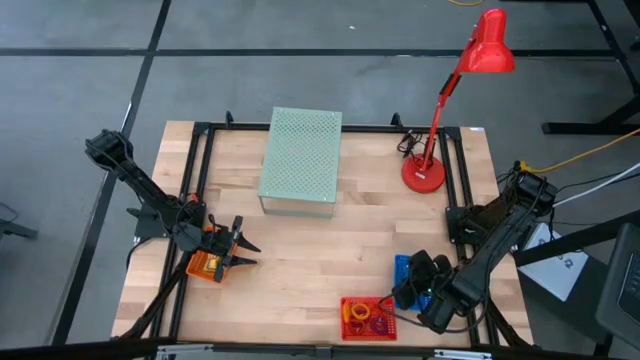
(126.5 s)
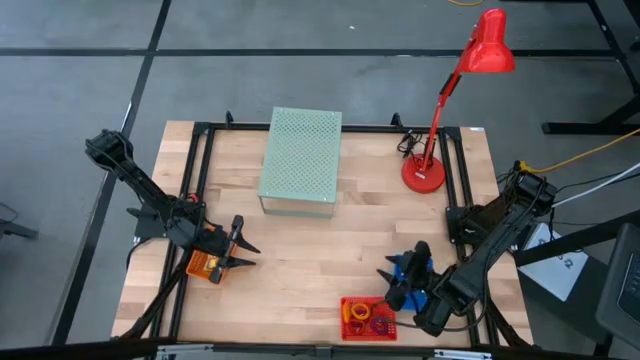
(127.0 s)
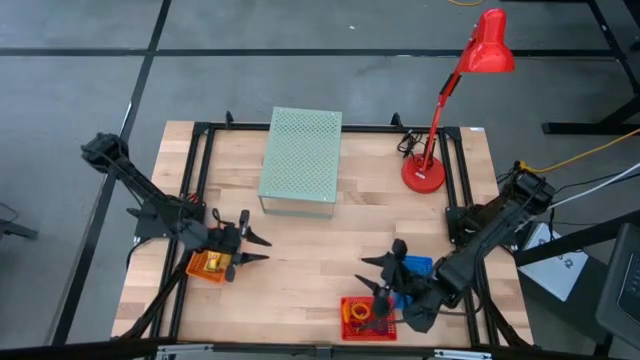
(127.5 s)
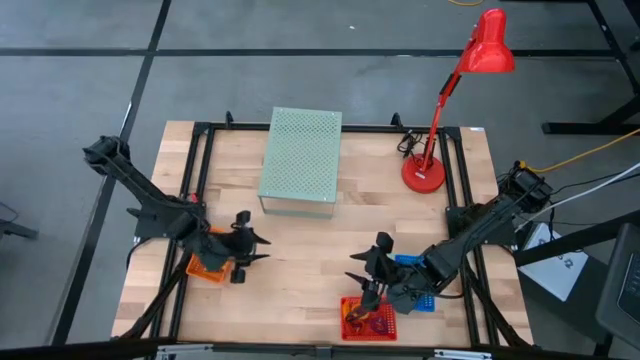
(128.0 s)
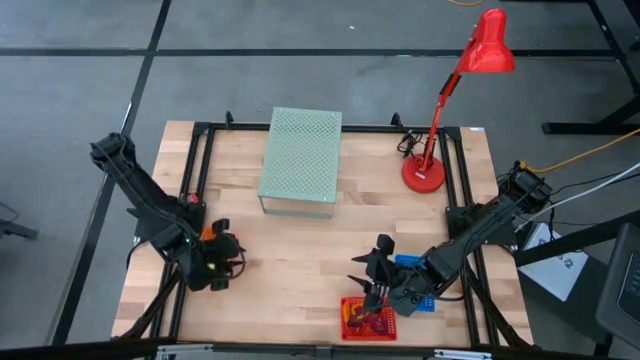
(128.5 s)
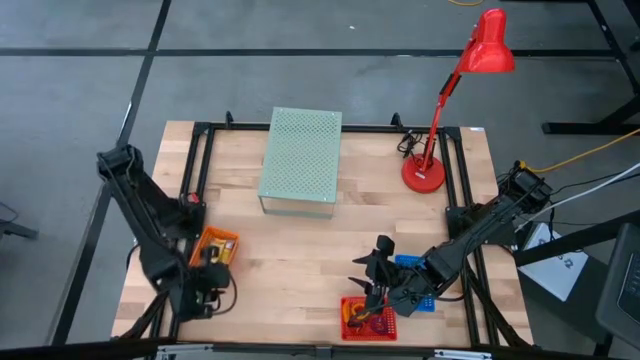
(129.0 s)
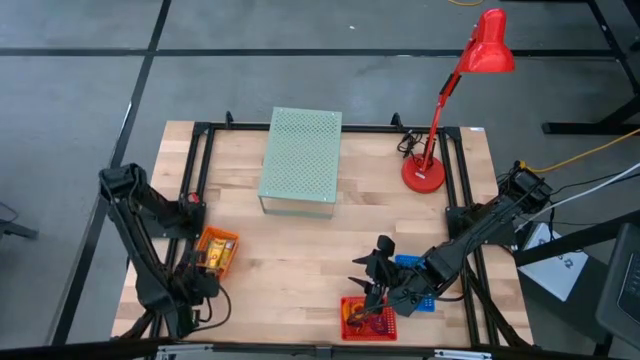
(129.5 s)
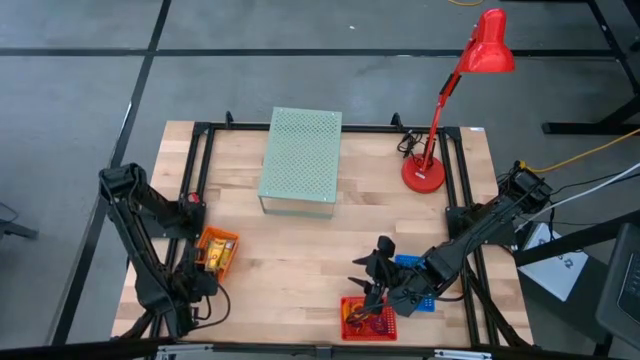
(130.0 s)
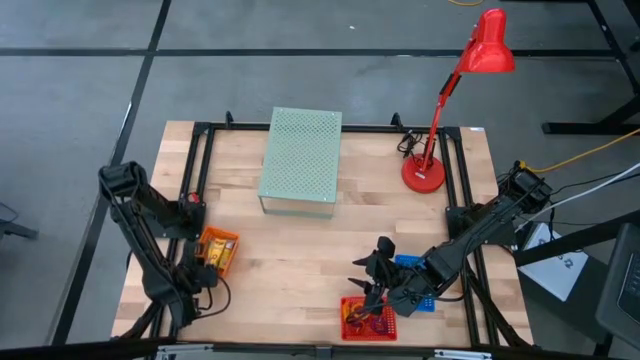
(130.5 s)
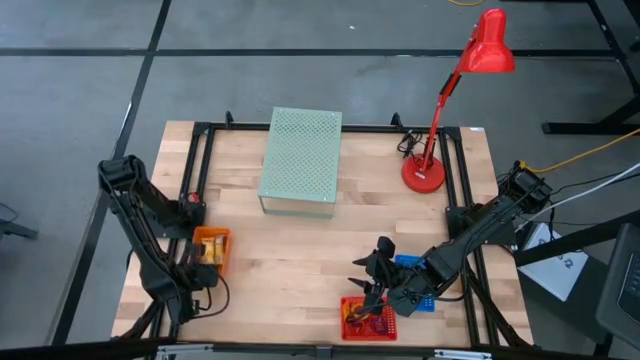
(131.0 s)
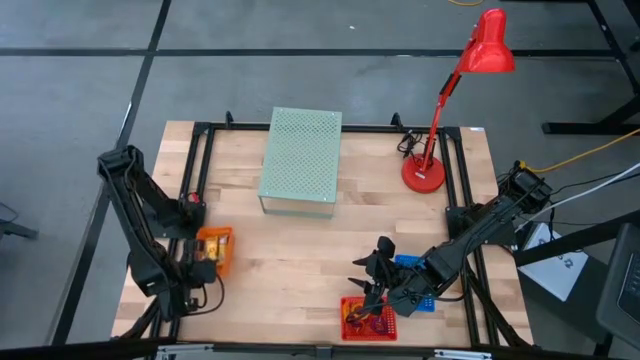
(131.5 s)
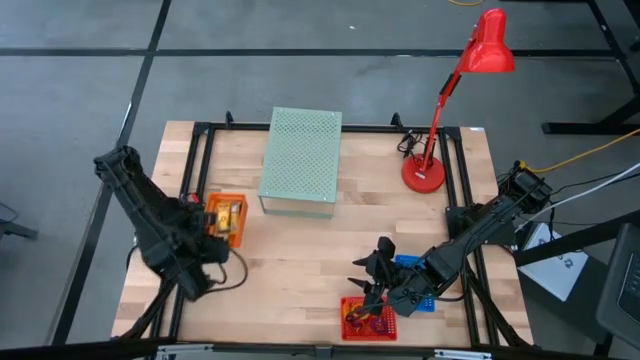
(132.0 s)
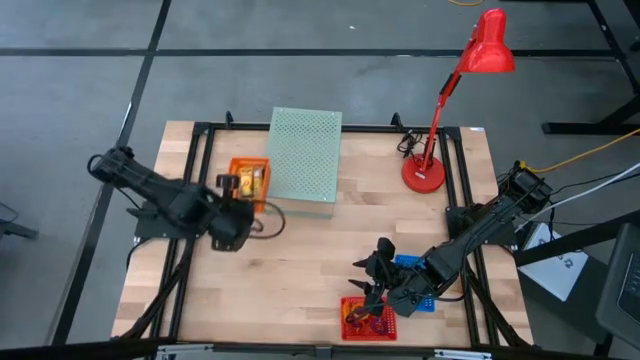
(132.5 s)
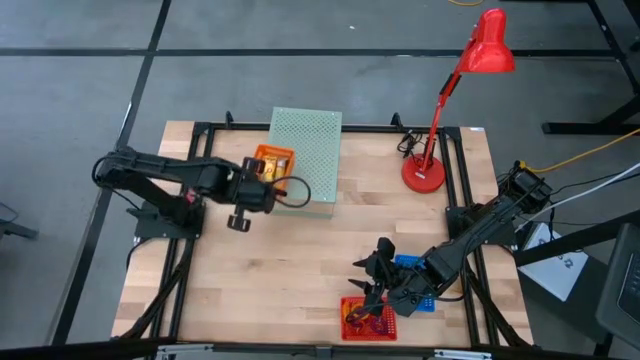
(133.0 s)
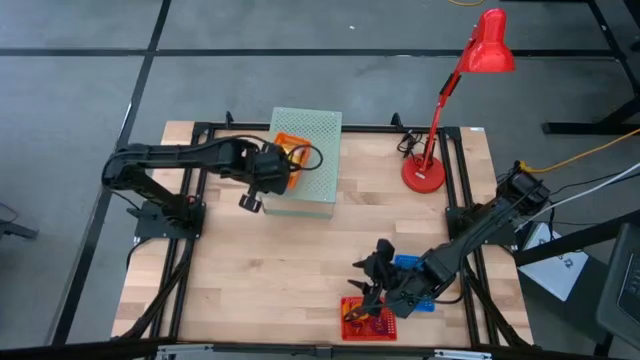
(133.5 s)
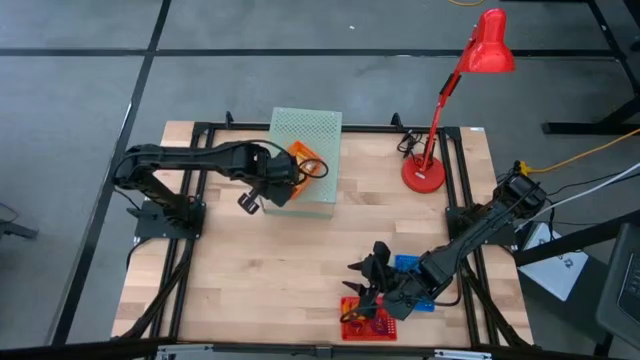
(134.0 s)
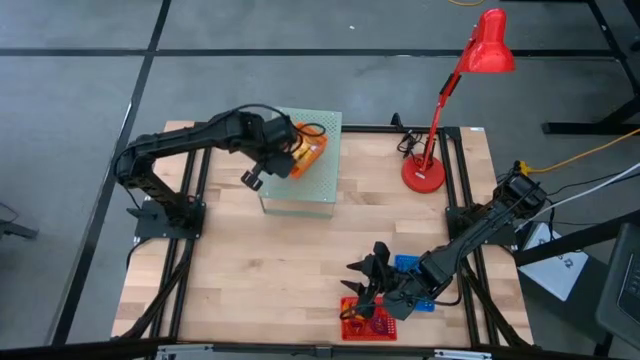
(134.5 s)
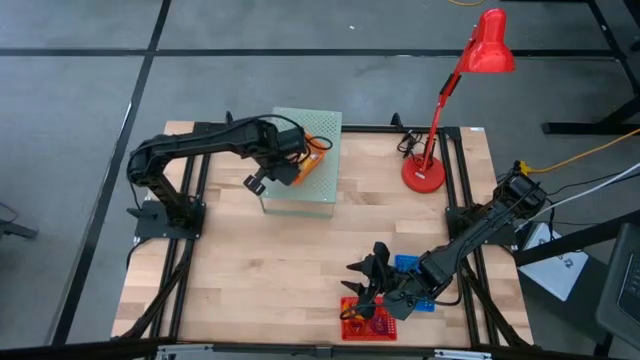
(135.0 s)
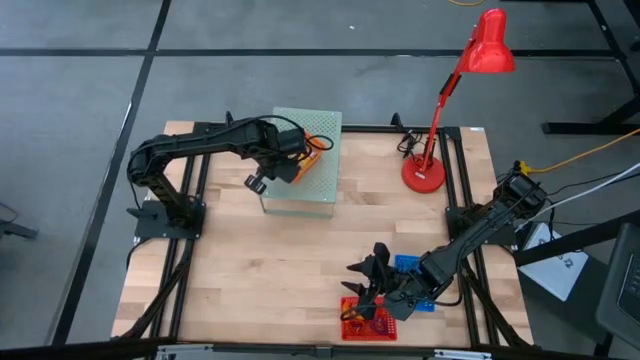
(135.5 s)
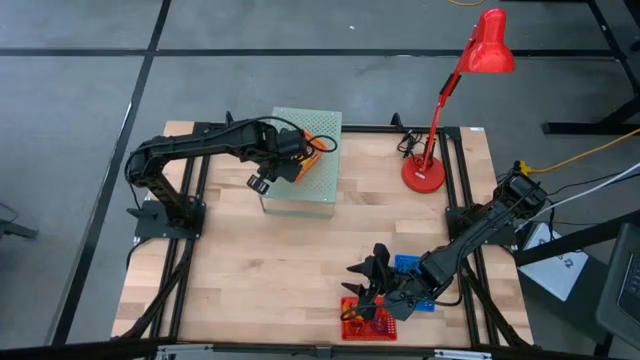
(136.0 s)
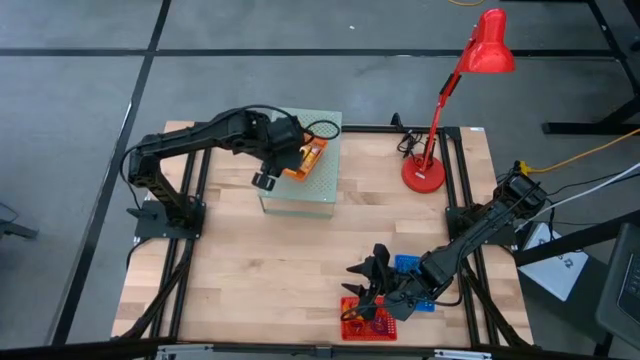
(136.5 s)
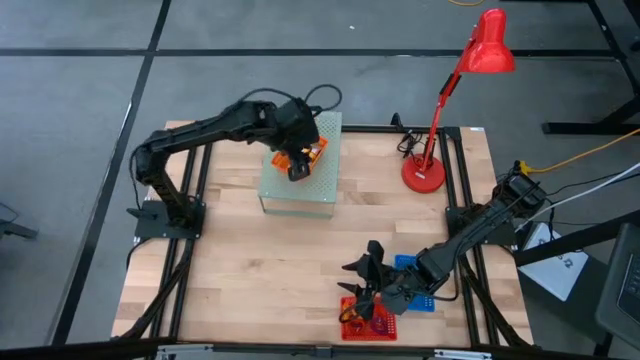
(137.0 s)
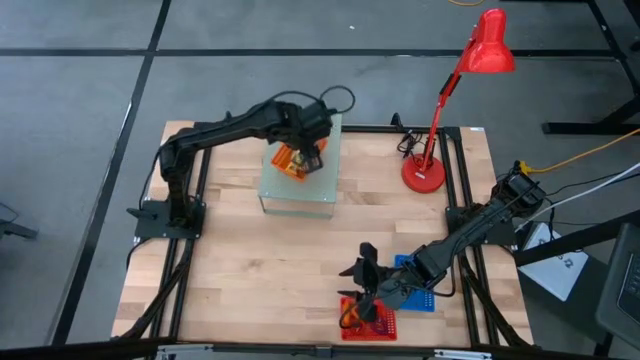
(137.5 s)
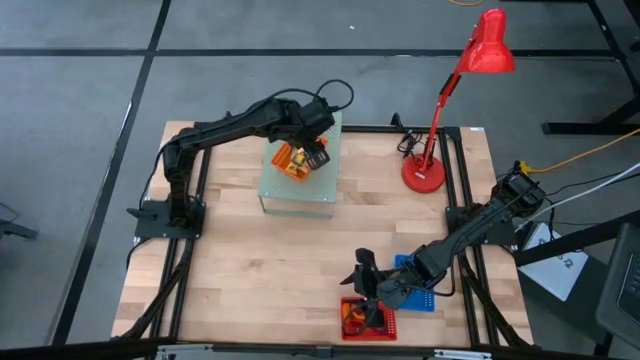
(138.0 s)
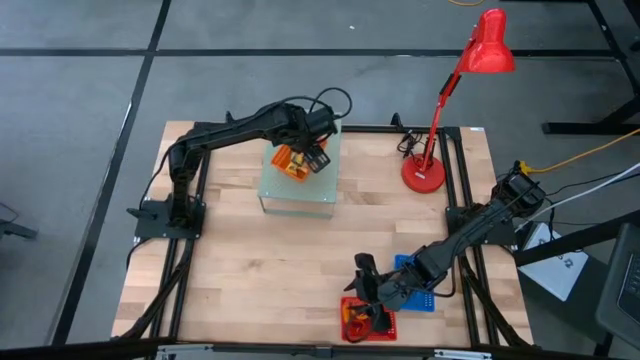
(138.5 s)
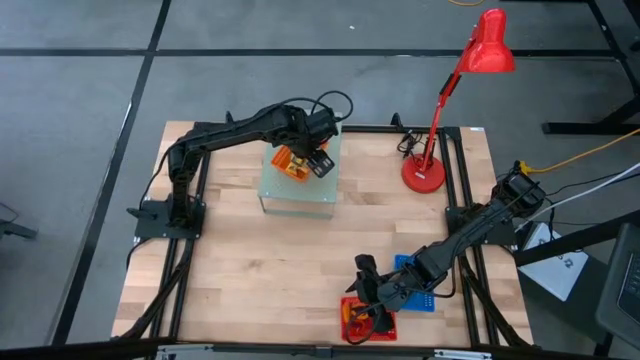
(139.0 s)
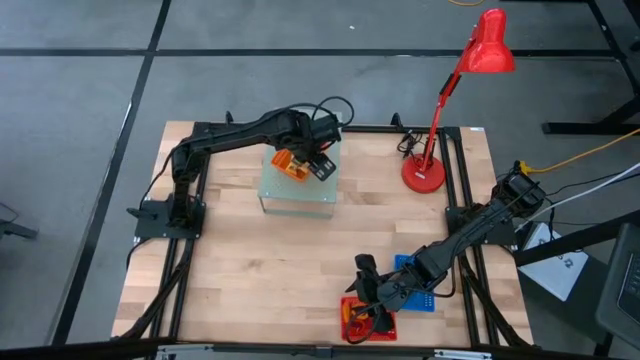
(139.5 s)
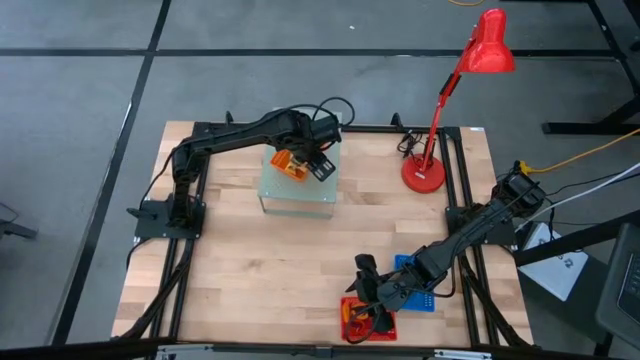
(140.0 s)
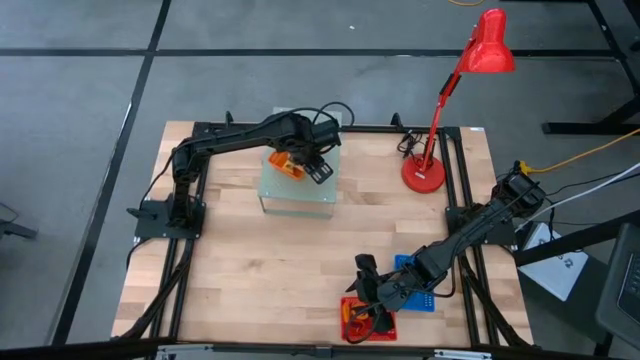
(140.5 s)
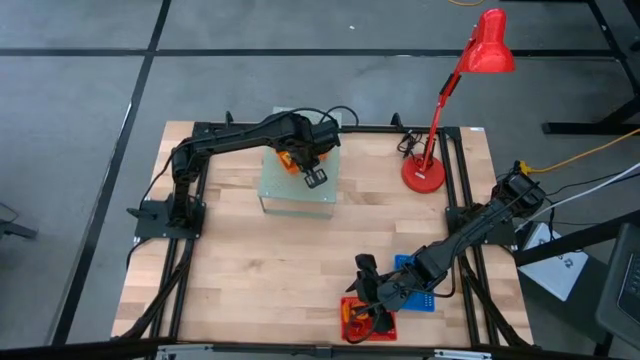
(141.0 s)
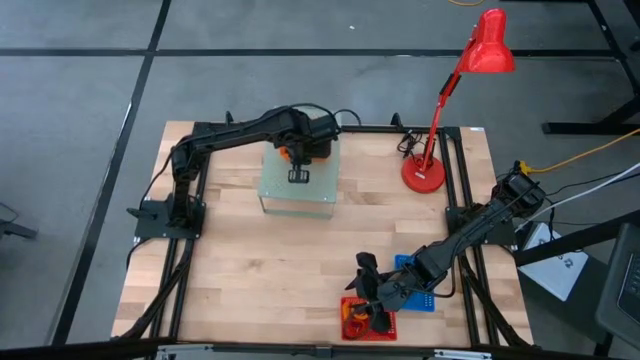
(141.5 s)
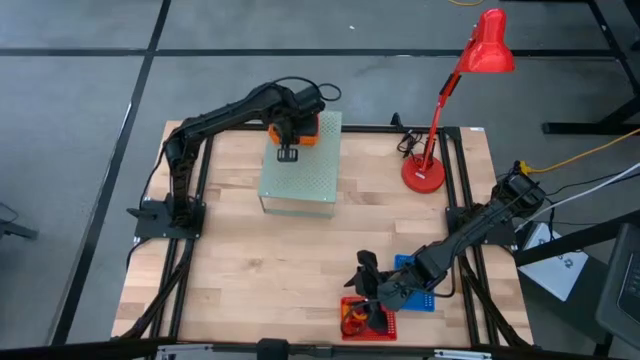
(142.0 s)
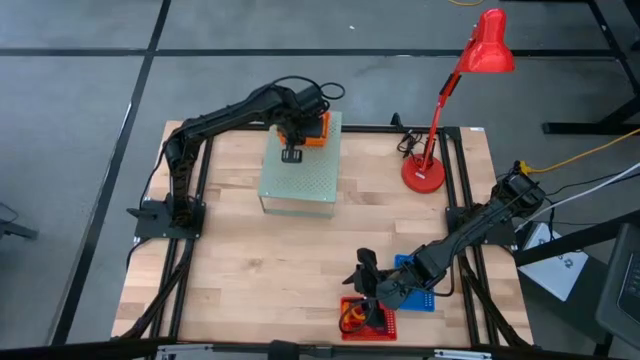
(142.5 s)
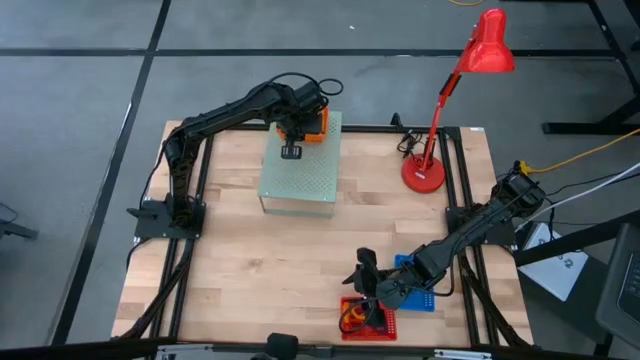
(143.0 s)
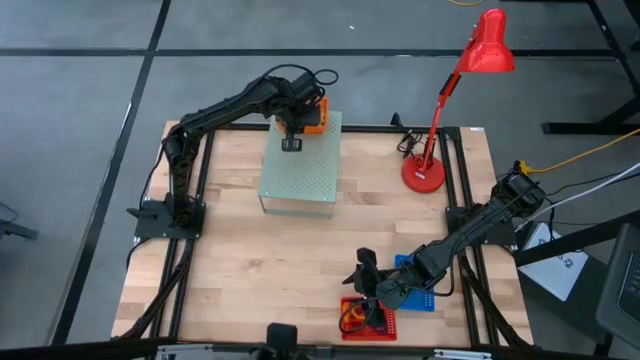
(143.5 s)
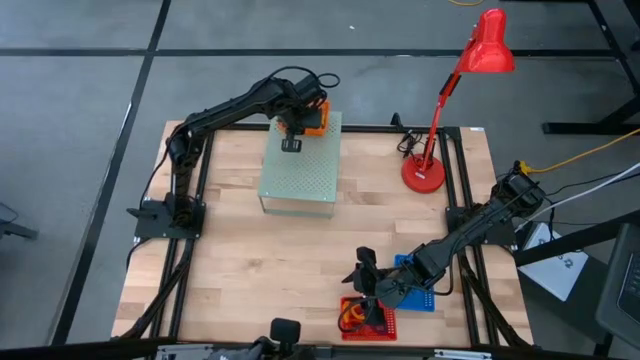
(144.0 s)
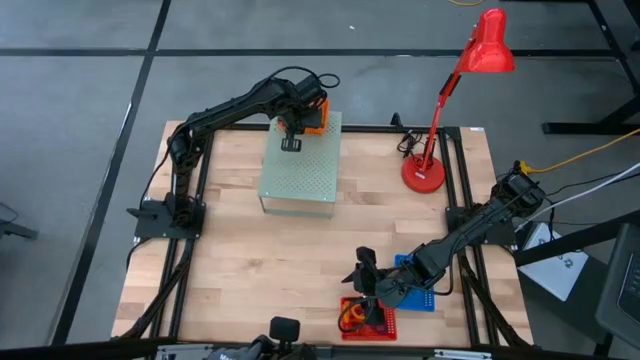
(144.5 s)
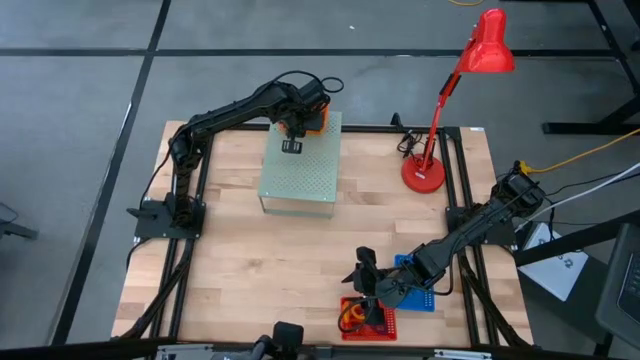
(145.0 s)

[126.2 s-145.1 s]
Task: Pick & Place Office Desk Supplies
Put the orange bin on the shelf

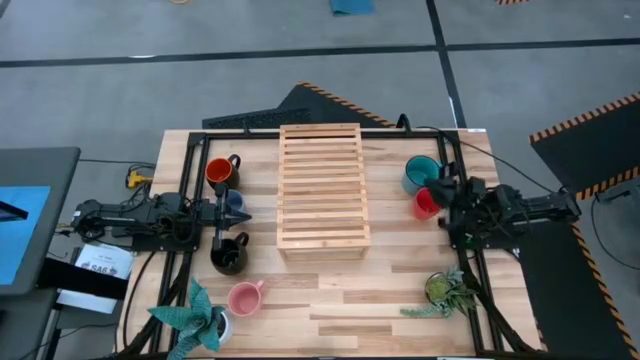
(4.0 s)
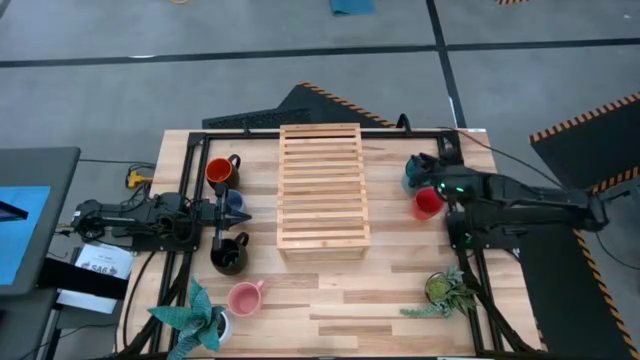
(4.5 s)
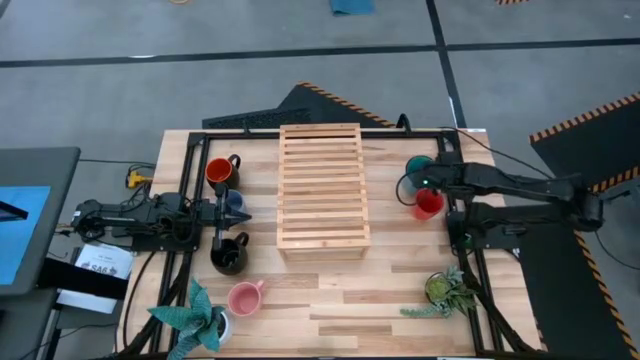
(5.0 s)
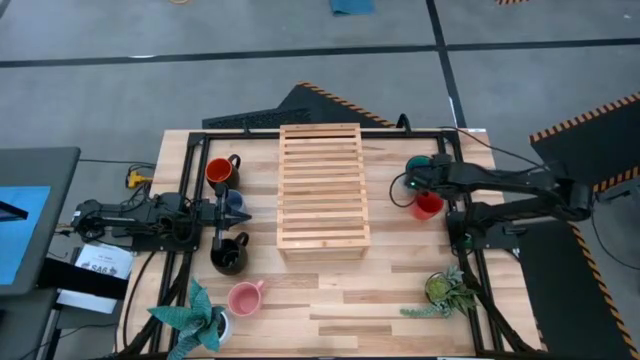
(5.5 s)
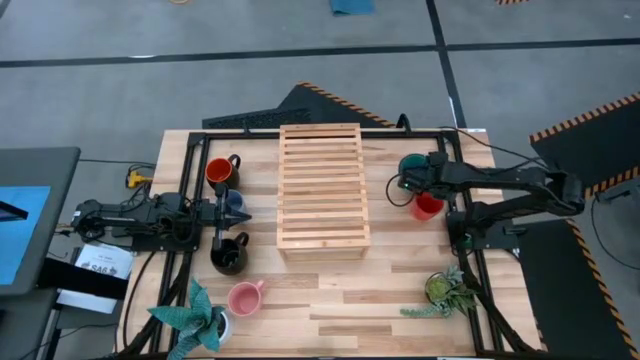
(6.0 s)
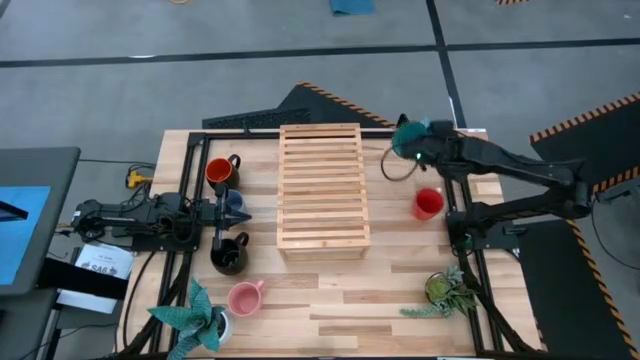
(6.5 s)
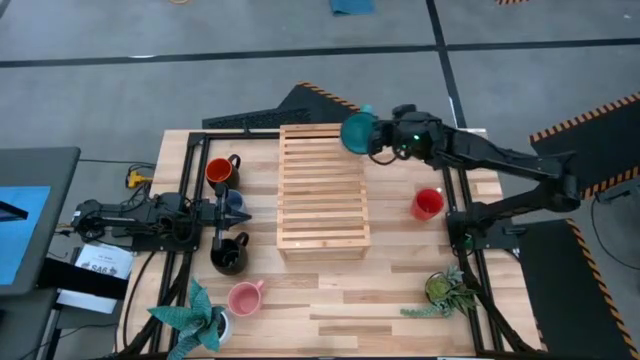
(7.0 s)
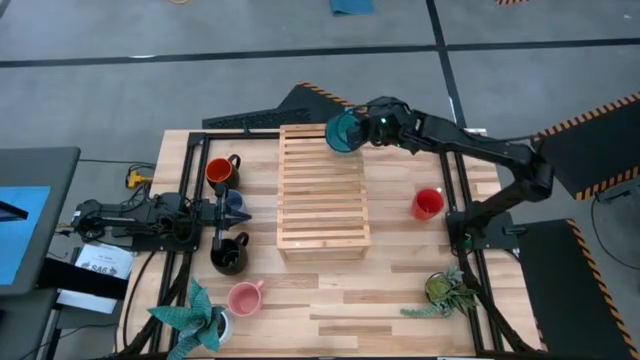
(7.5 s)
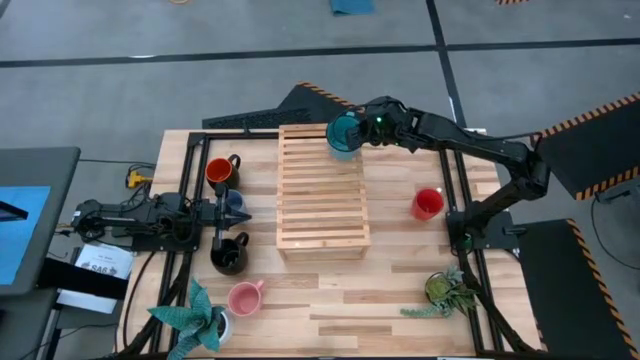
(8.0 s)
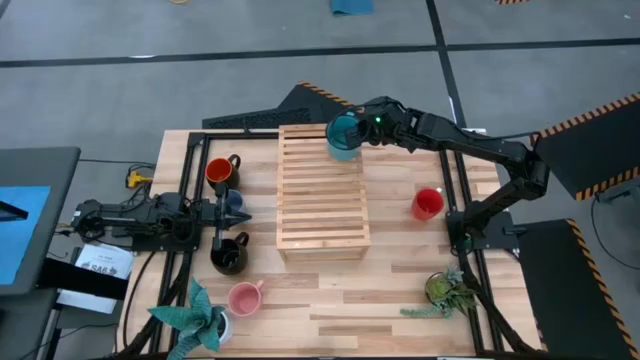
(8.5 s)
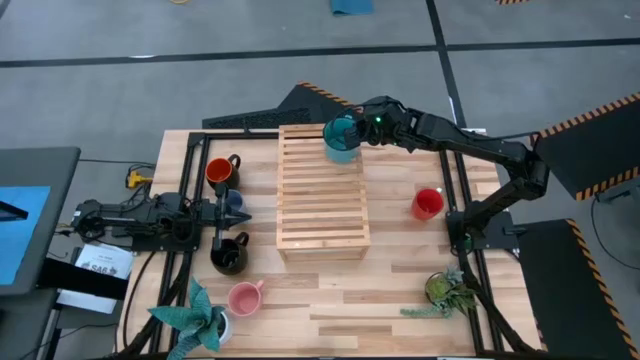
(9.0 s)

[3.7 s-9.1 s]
Task: Place coffee mugs
Put the right blue mug on the shelf
